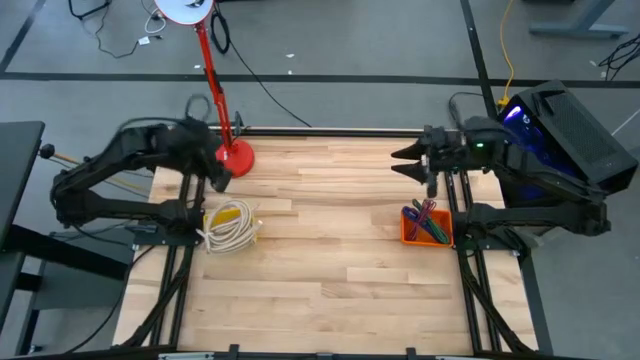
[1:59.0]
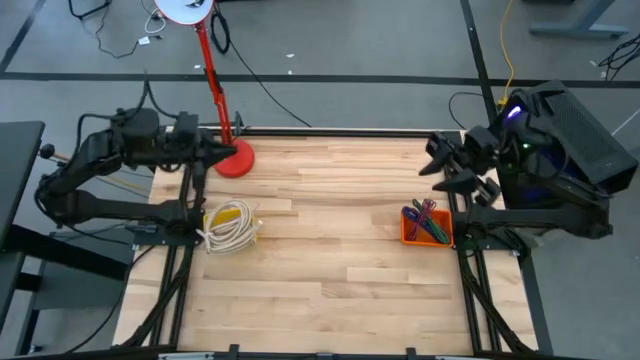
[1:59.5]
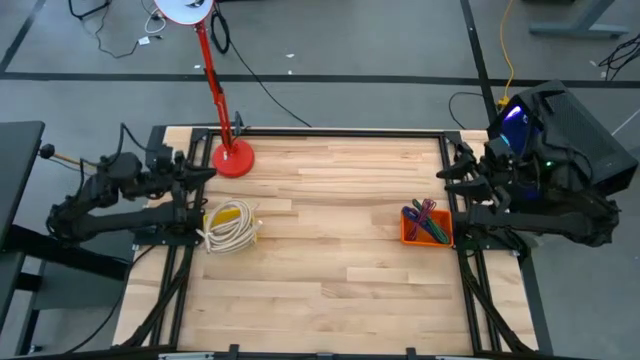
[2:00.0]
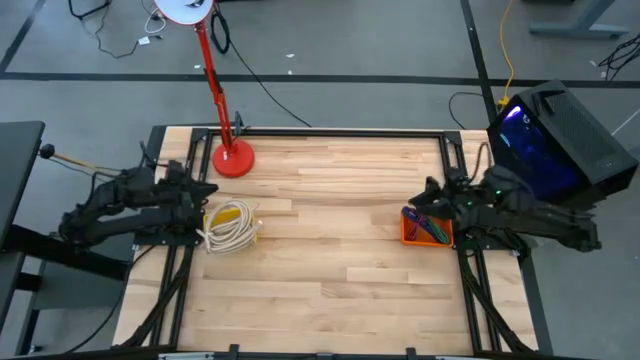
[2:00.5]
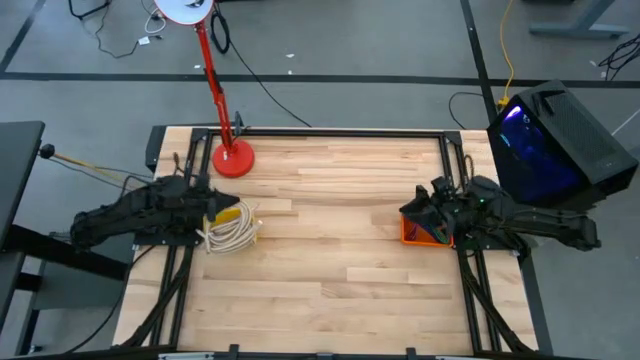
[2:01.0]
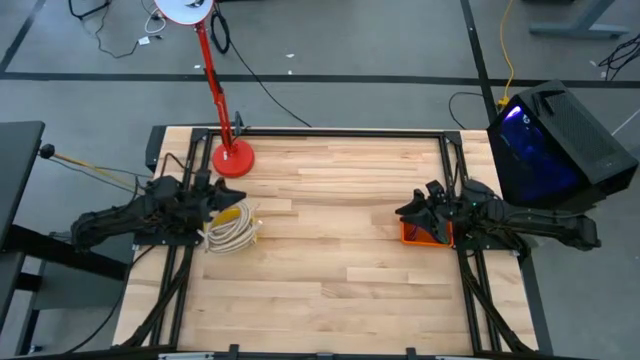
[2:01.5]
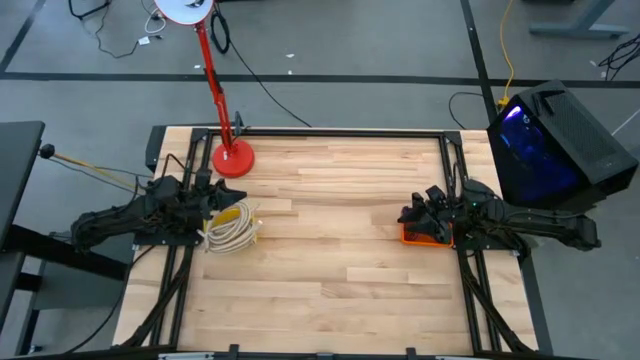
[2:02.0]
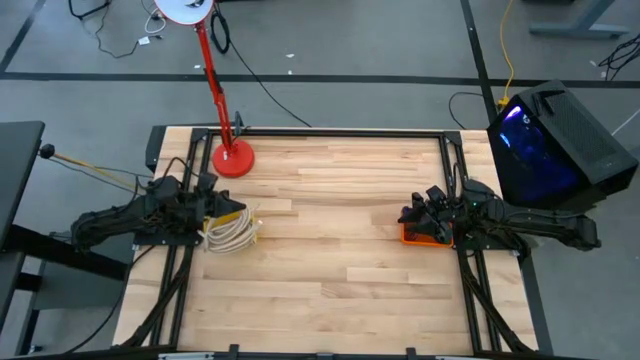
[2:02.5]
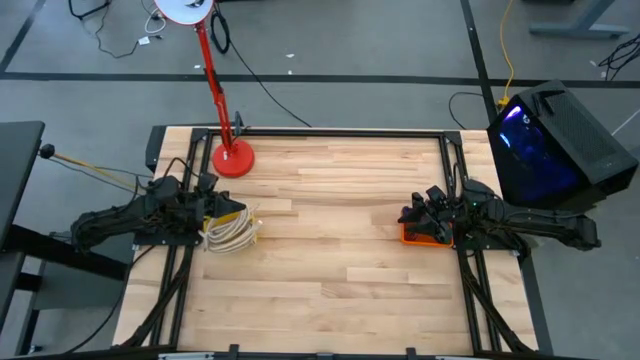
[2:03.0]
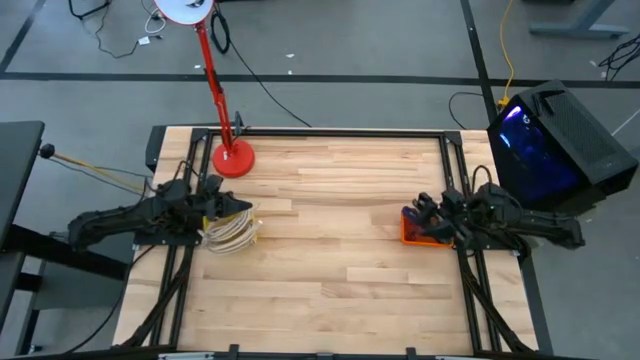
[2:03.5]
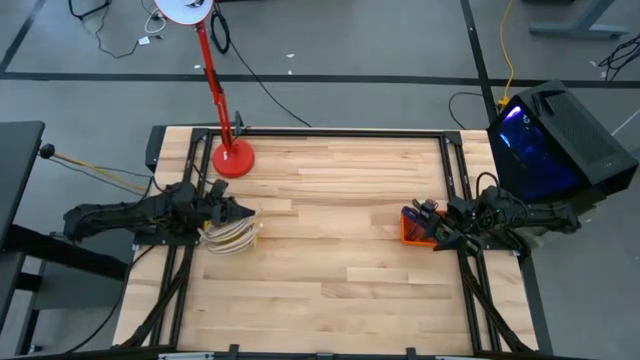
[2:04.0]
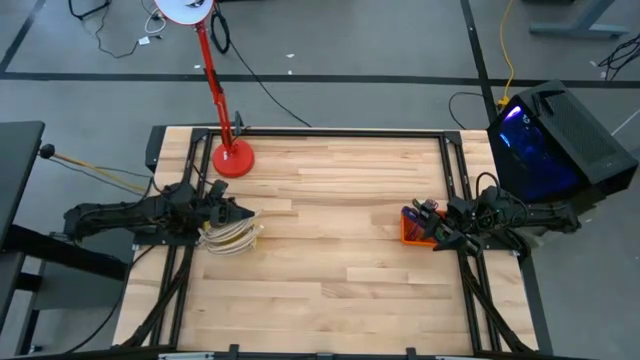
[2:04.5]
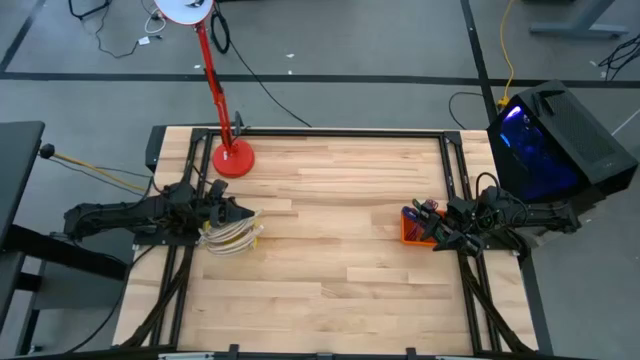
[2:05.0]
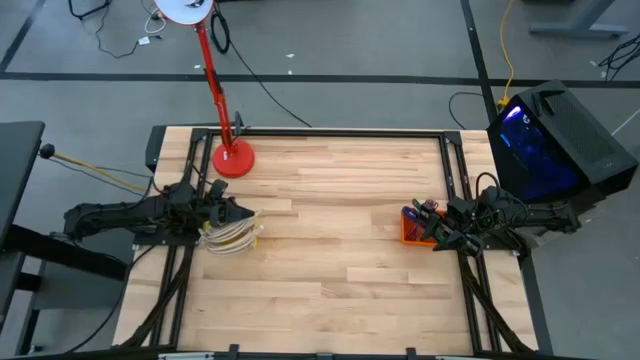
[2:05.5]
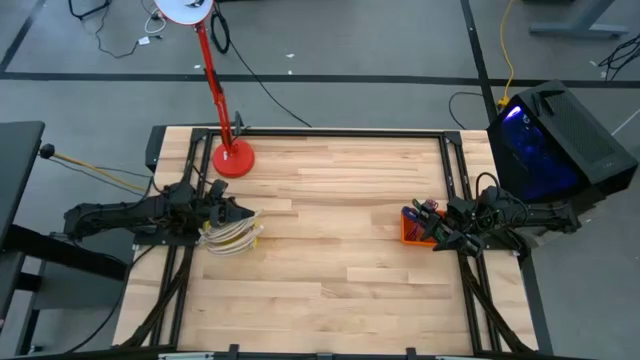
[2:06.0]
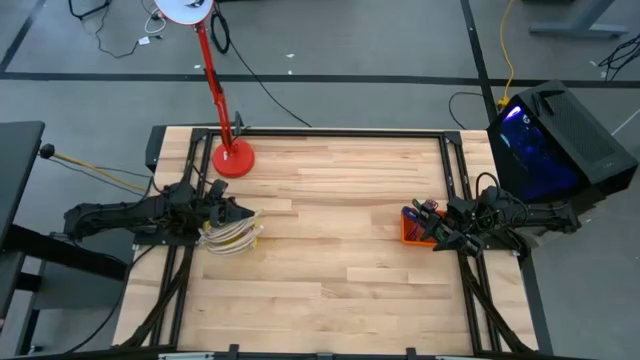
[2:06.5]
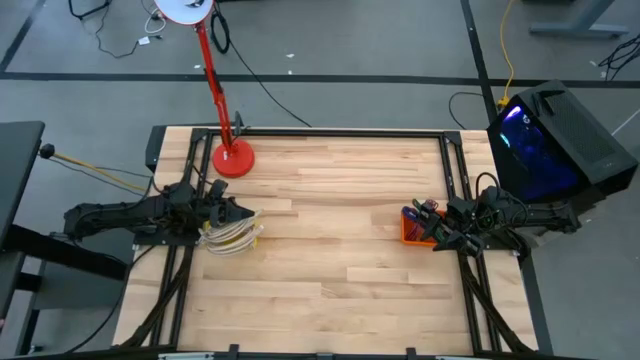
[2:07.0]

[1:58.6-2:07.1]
Task: Pick & Place USB Port
Return to Home Position

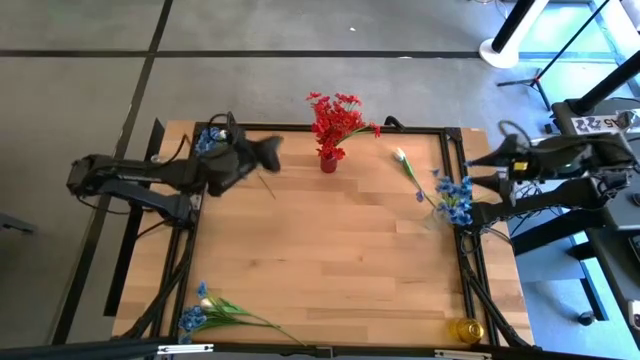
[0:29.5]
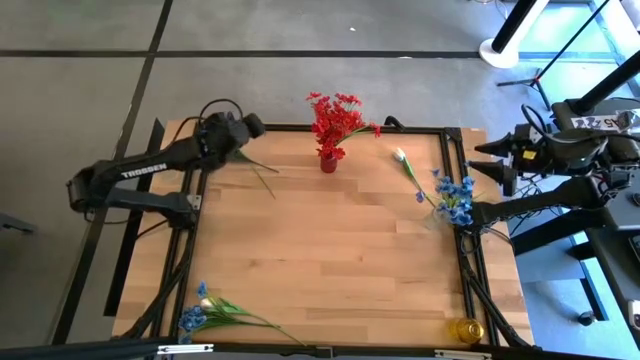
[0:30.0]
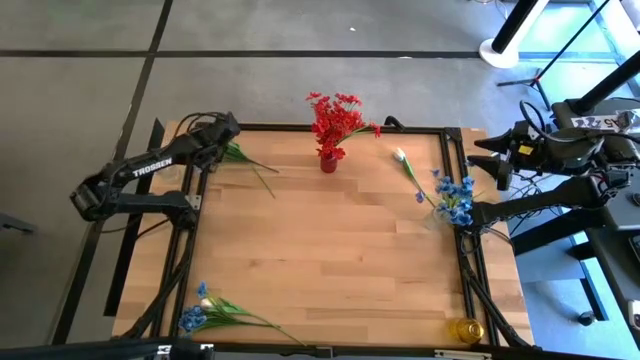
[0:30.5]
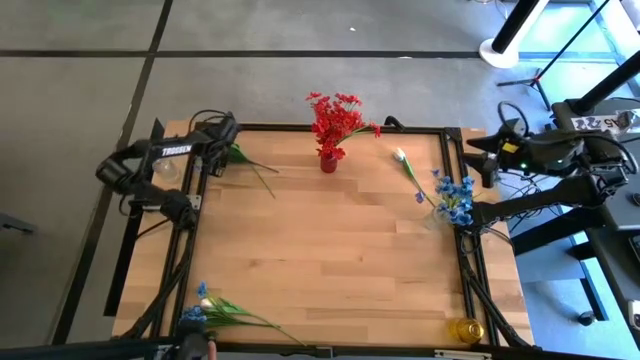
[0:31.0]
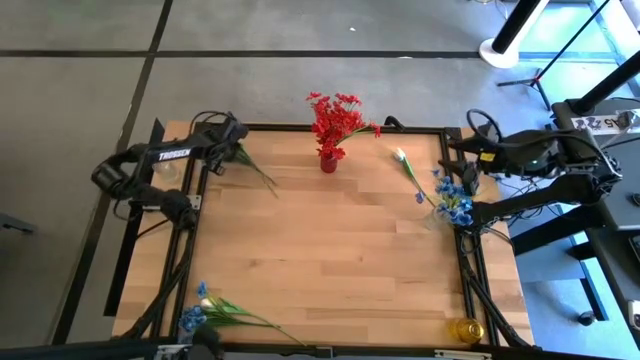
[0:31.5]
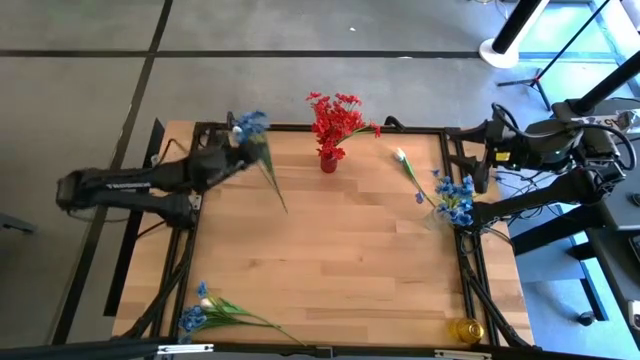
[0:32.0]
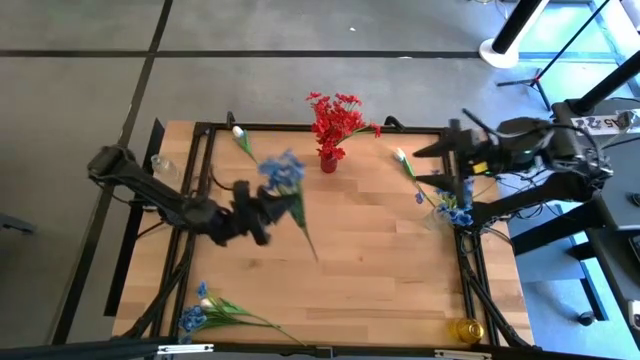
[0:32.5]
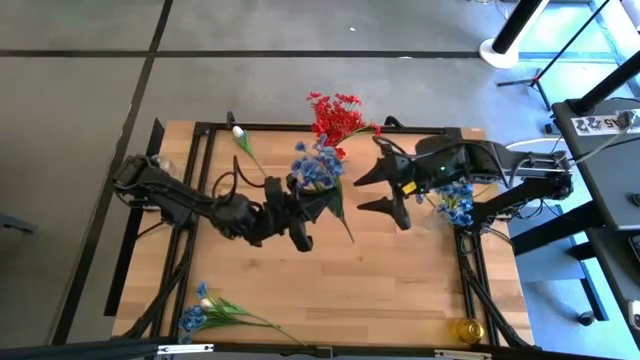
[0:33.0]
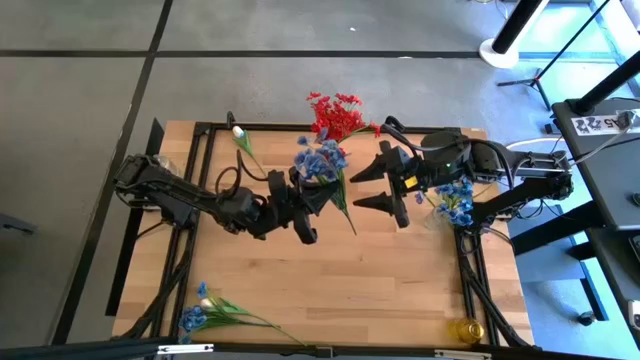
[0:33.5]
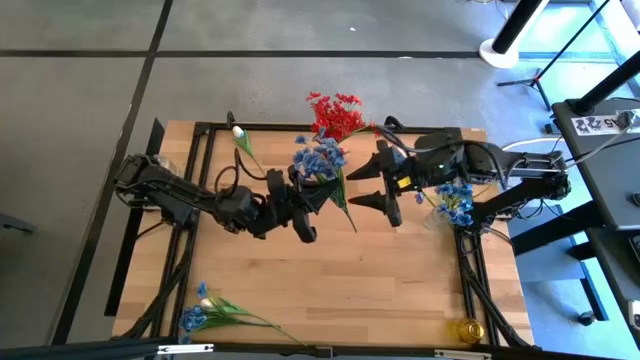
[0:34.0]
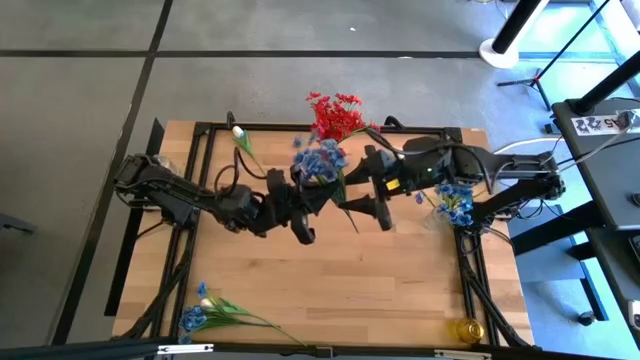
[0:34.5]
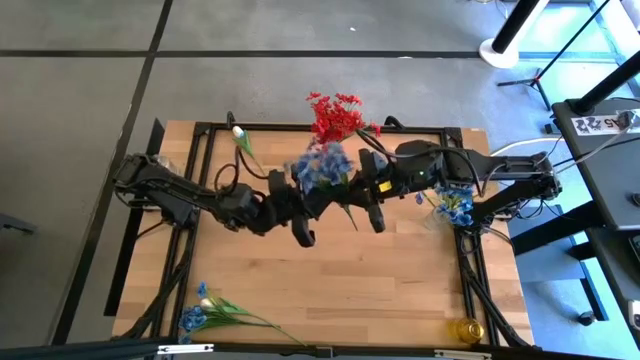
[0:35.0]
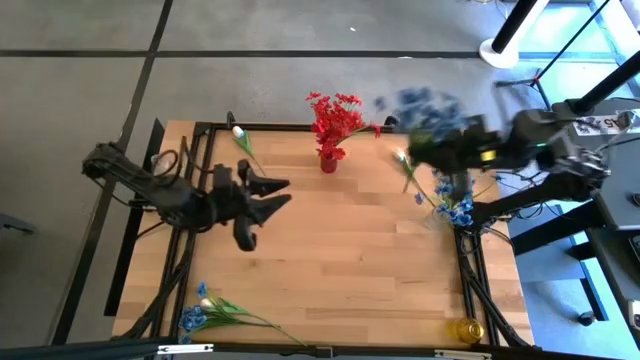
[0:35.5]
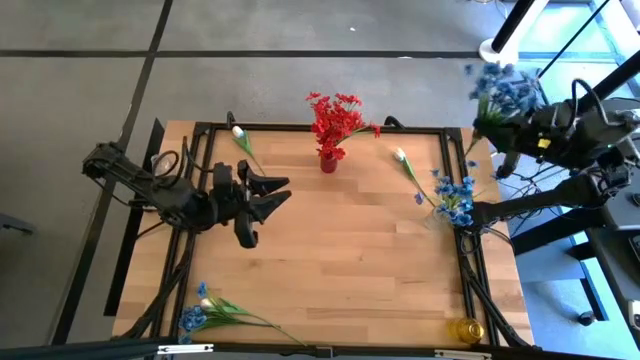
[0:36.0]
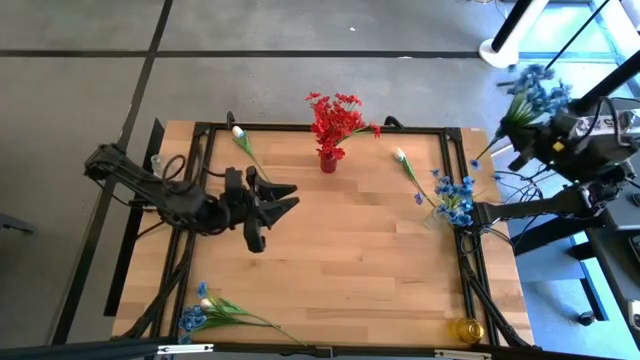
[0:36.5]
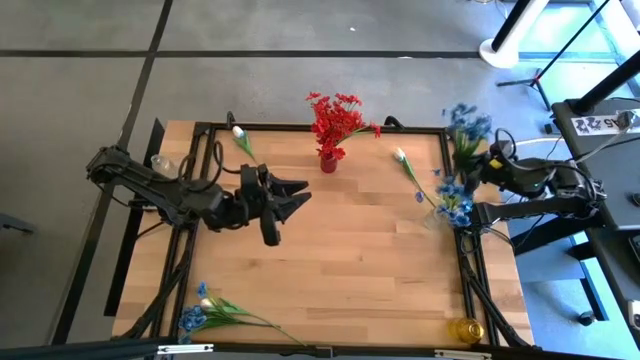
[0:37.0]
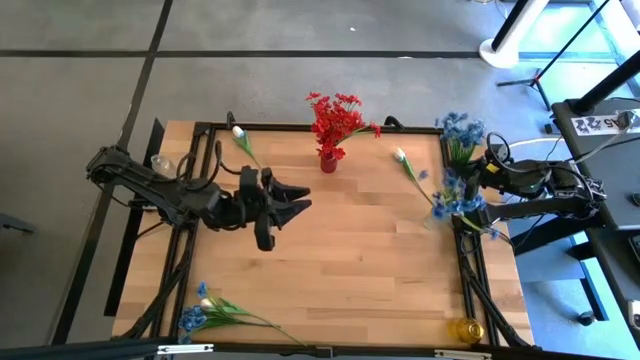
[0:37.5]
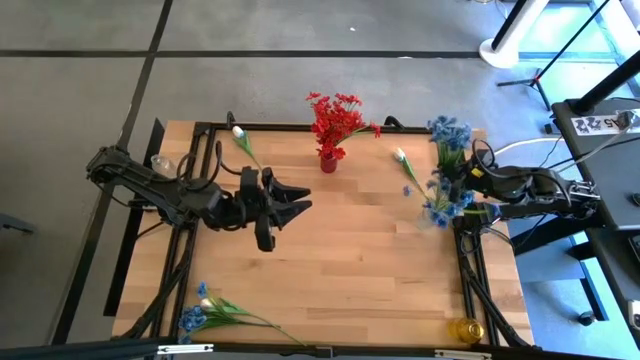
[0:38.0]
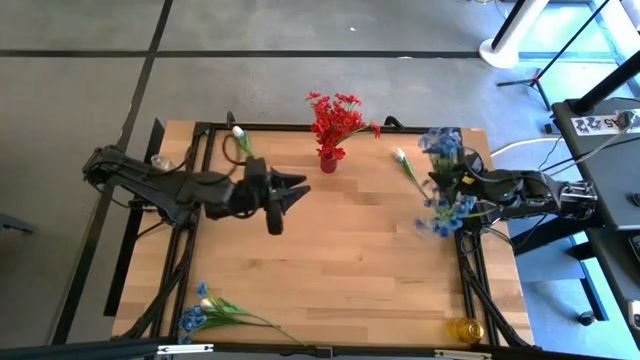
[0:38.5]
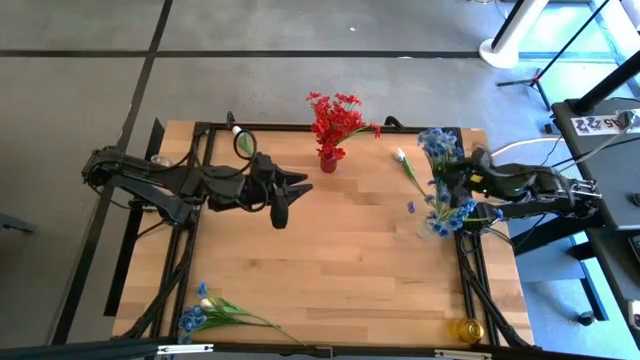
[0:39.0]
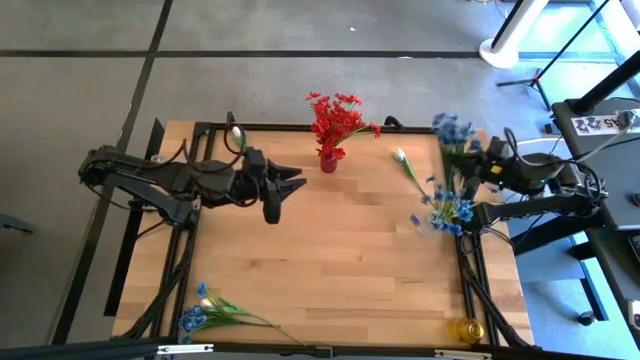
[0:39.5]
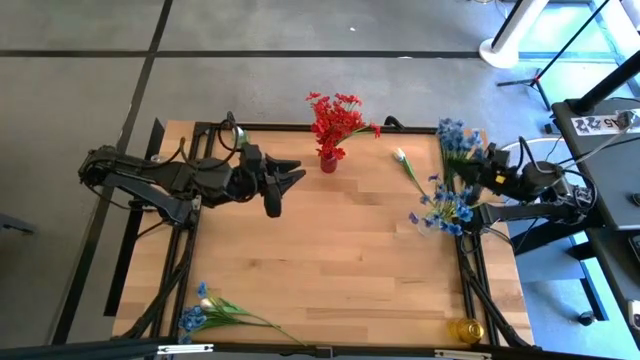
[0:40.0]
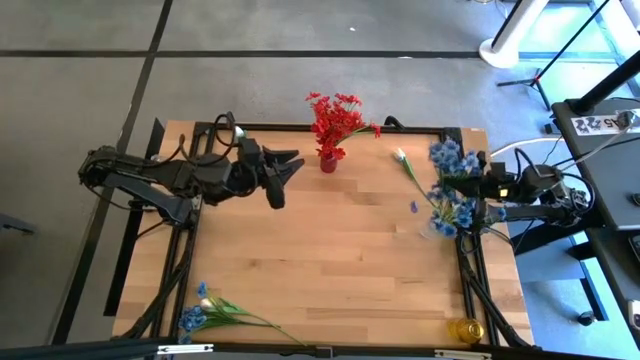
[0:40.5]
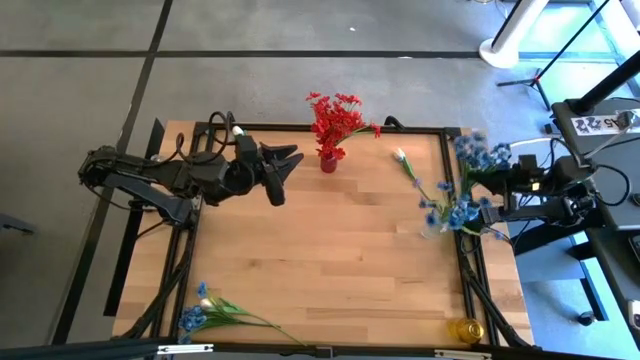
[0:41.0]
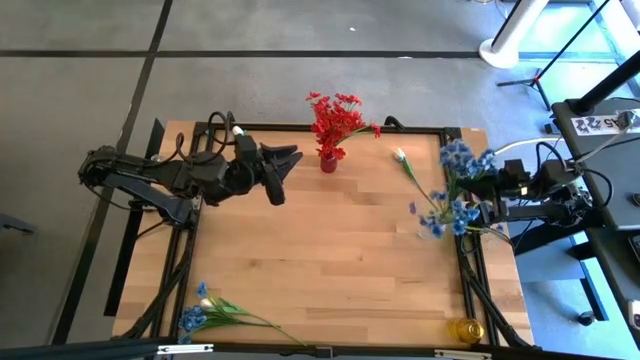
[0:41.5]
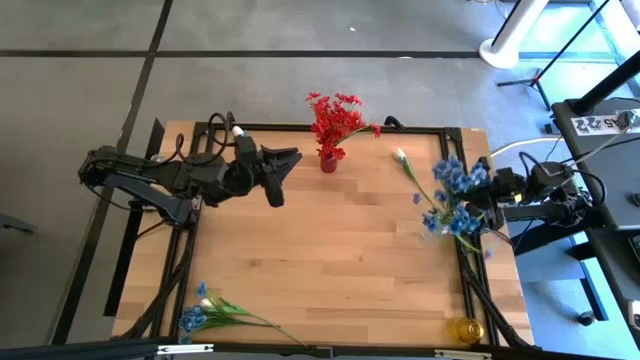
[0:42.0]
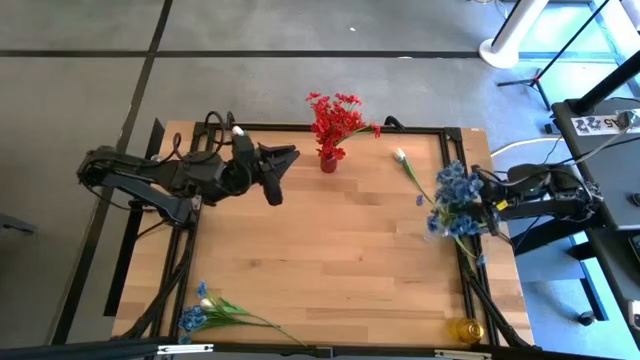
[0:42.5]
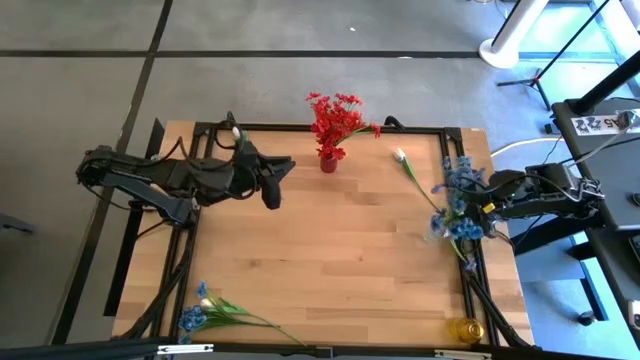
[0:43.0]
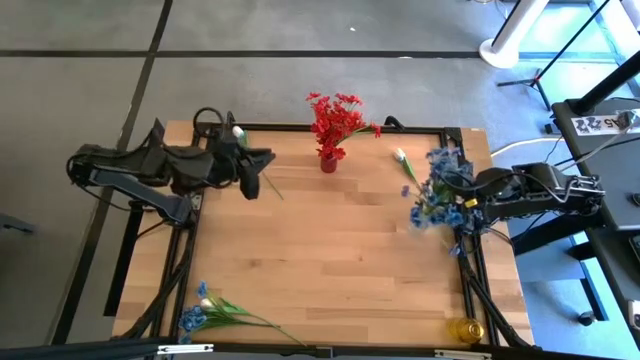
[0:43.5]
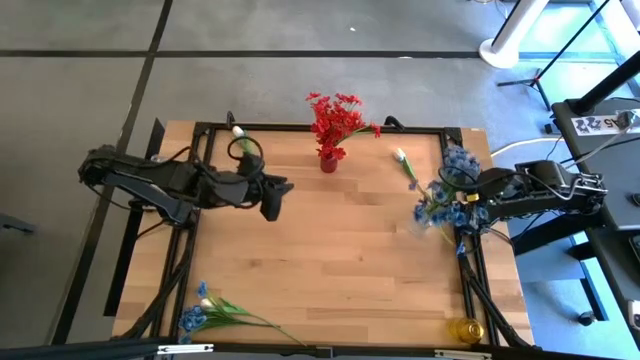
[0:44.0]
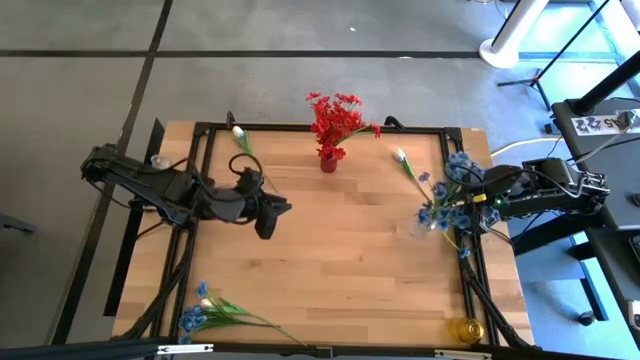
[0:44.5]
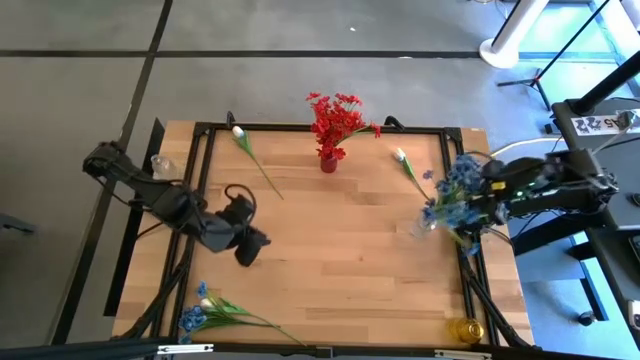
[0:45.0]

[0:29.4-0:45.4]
Task: Sort flowers into vase by color
Put the top blue flowers into the transparent vase
